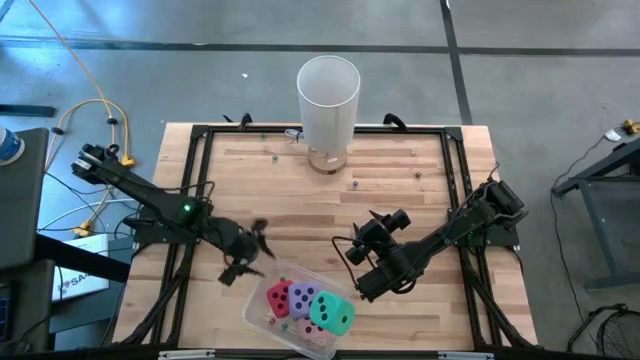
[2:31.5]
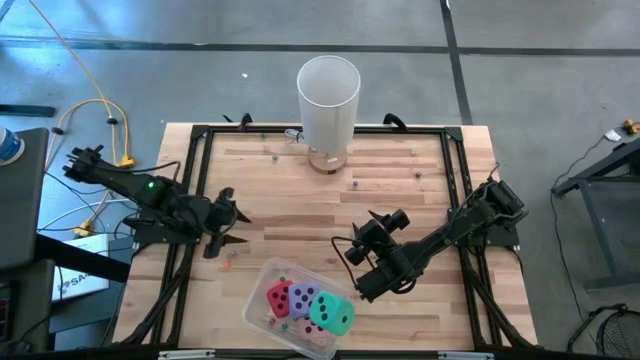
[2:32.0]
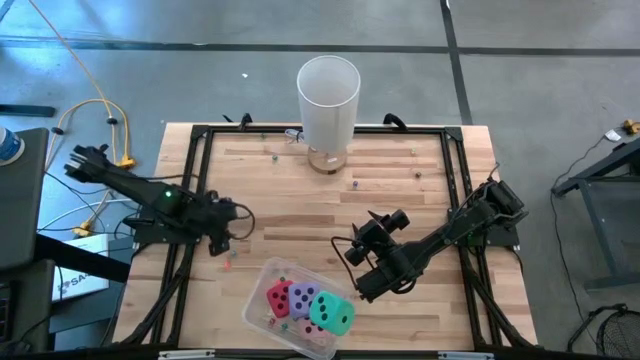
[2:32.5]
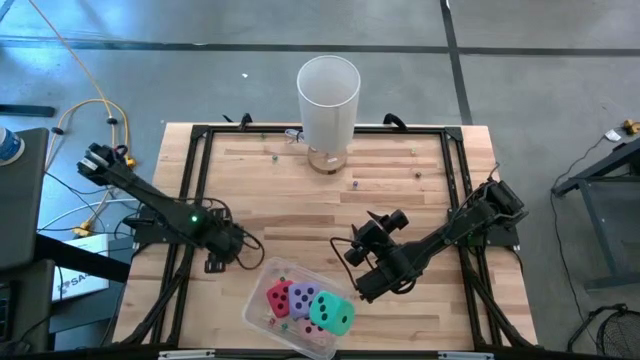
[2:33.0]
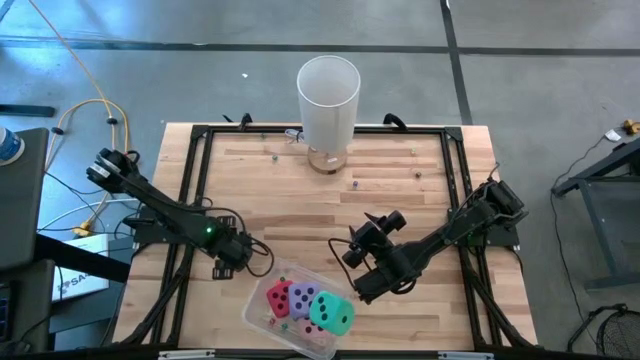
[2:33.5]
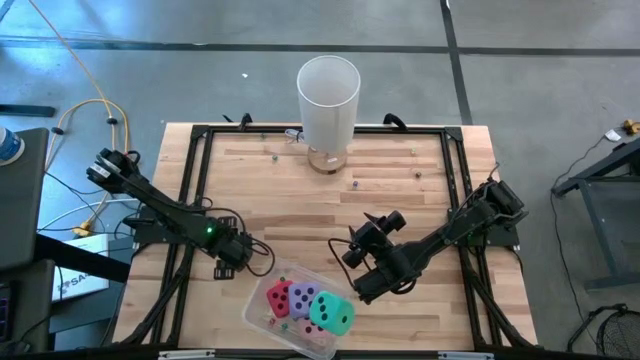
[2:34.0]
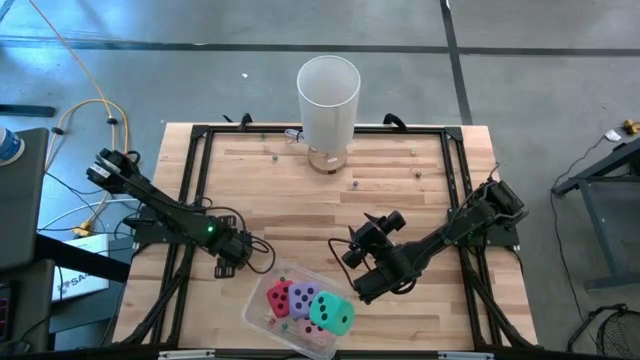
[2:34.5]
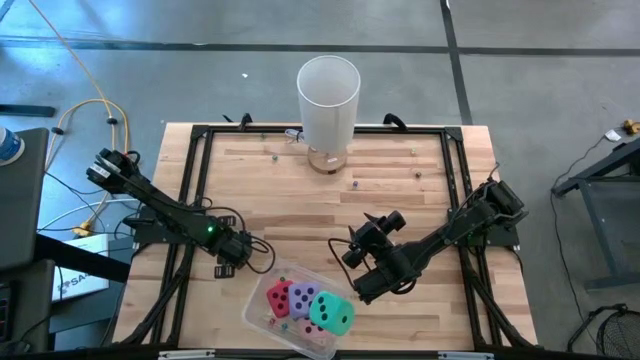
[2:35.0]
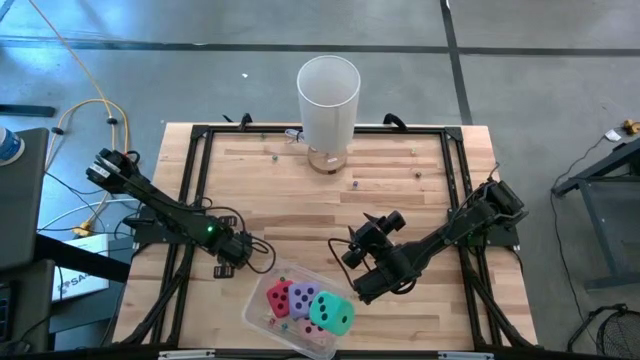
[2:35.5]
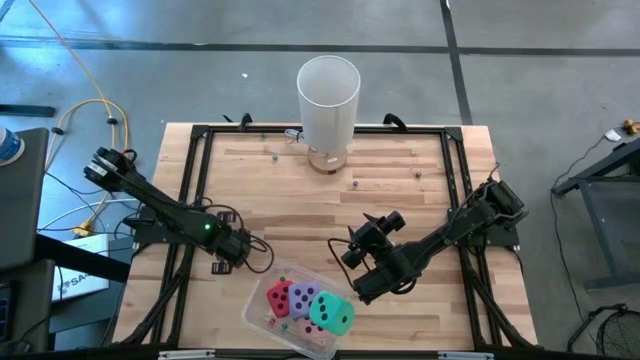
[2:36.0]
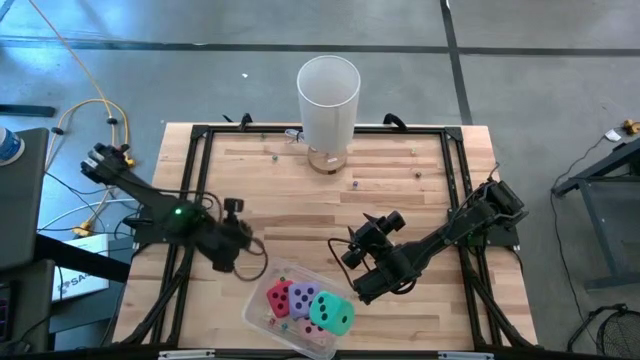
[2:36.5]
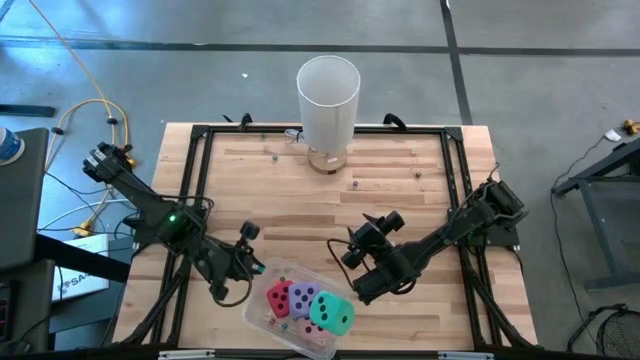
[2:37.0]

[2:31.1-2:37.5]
Task: Pick & Place Dice
Put the small blue dice into the transparent bin

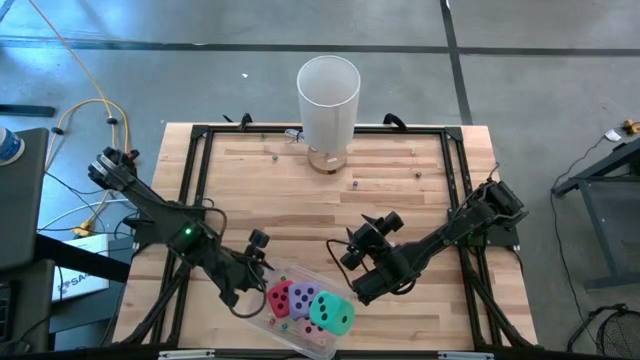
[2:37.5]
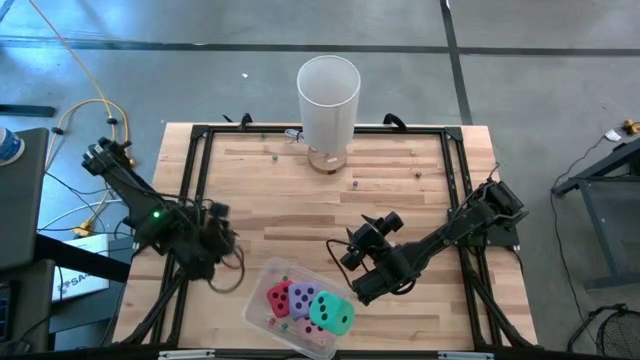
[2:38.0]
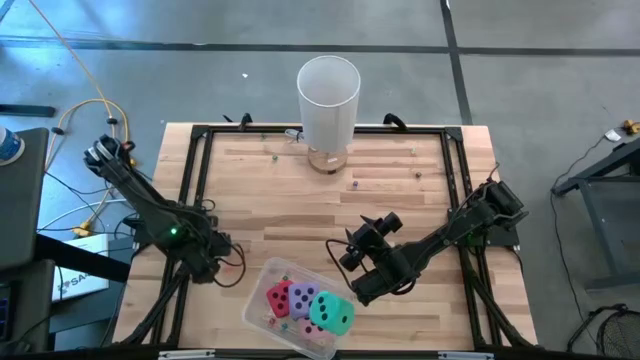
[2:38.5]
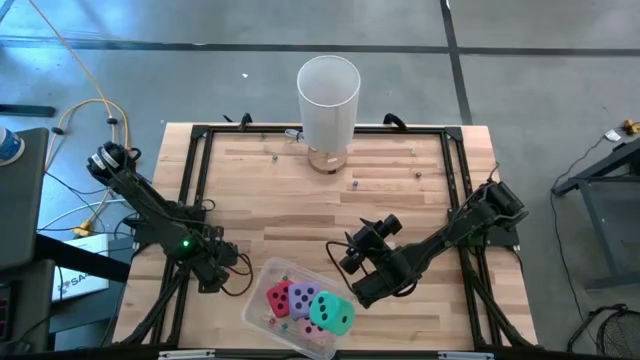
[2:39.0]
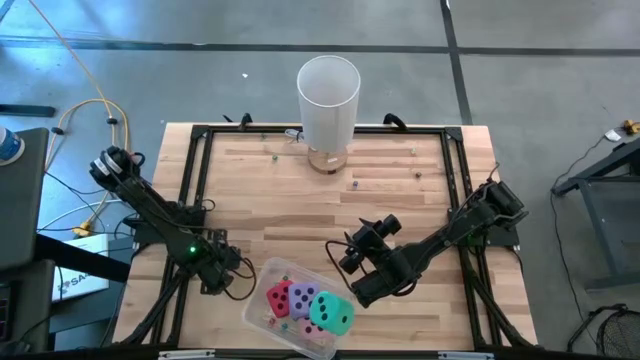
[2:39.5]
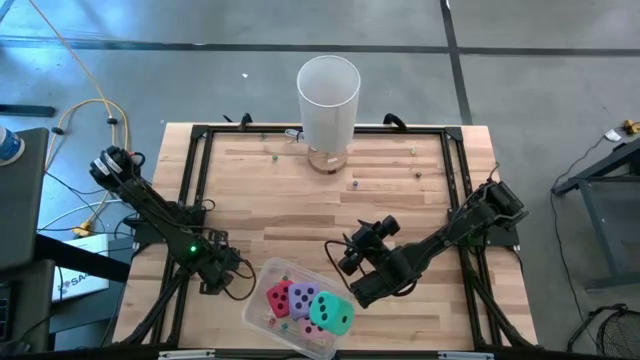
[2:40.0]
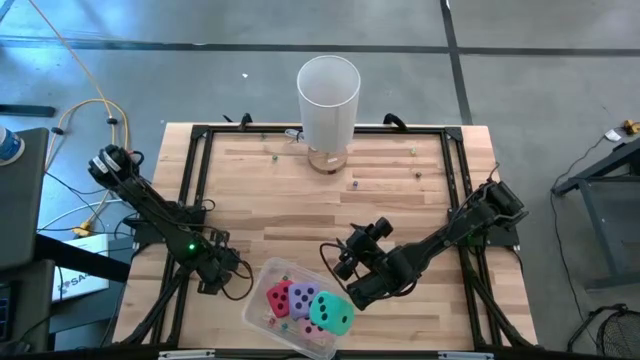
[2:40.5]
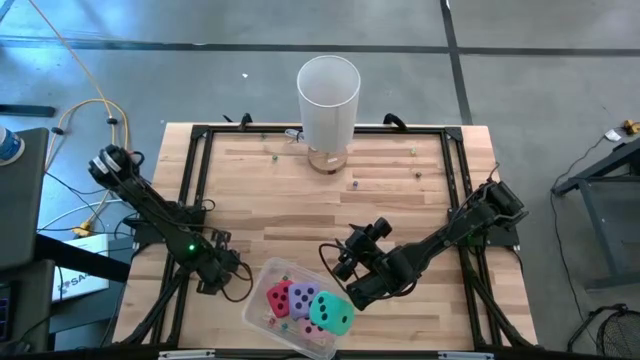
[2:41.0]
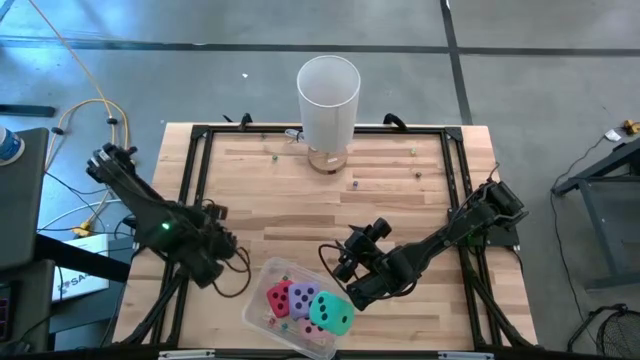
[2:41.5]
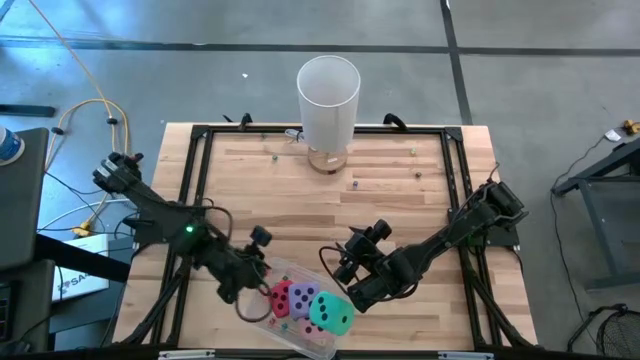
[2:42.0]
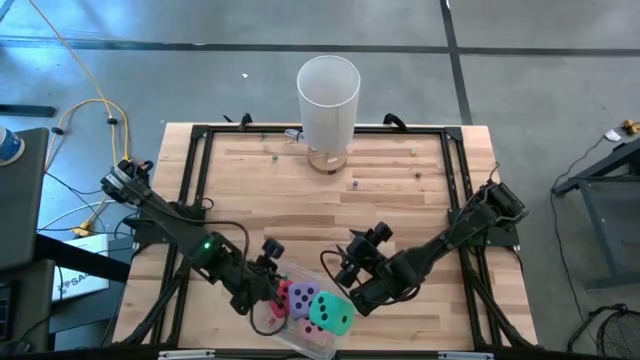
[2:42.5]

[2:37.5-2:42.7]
Put the small orange dice into the transparent bin

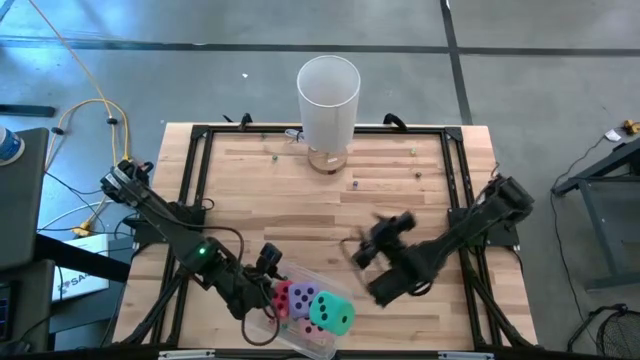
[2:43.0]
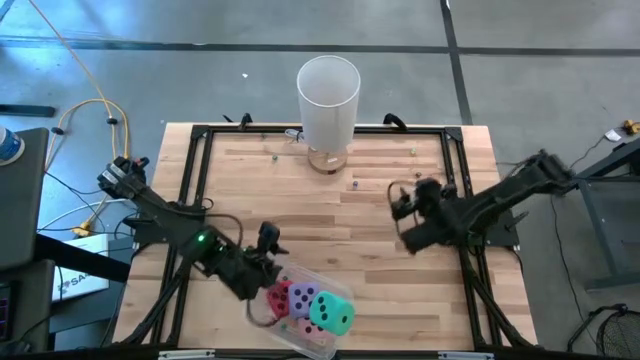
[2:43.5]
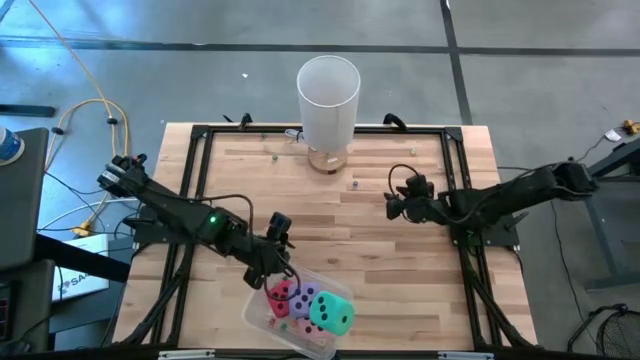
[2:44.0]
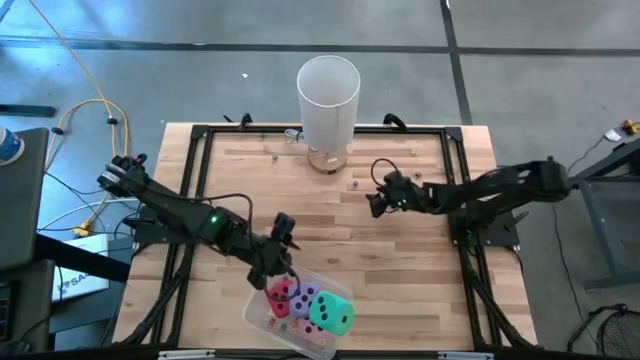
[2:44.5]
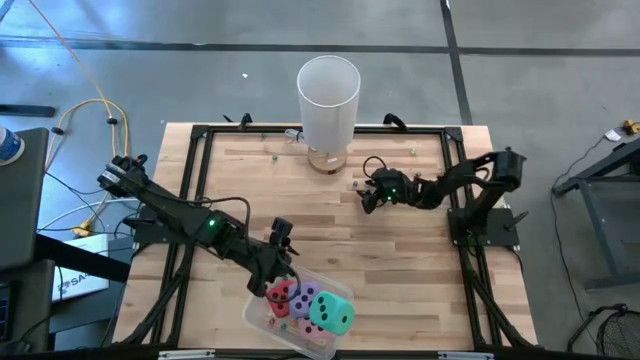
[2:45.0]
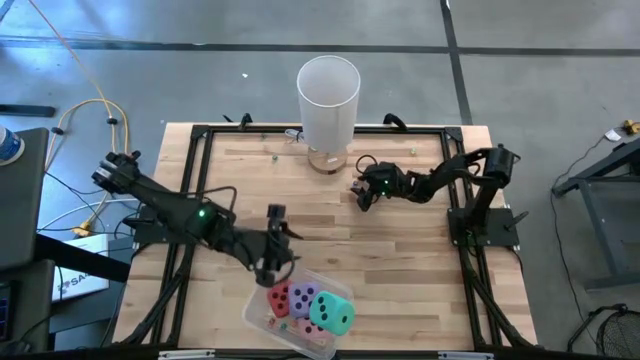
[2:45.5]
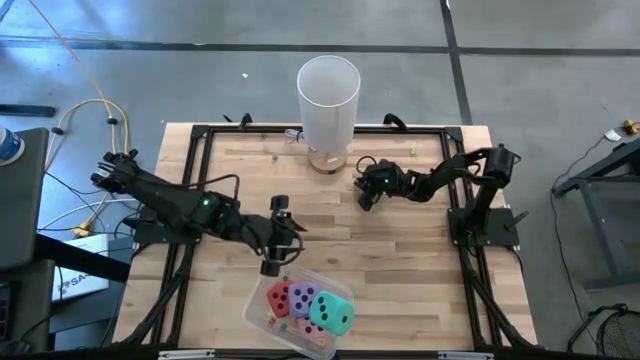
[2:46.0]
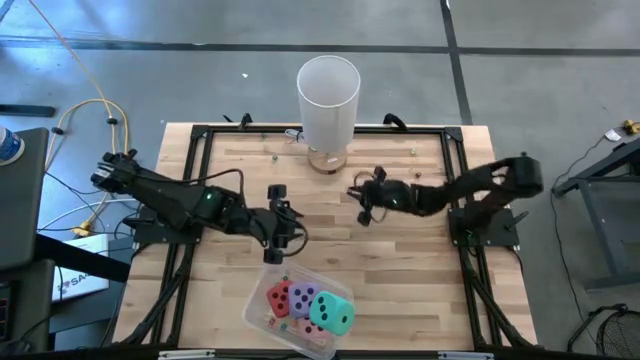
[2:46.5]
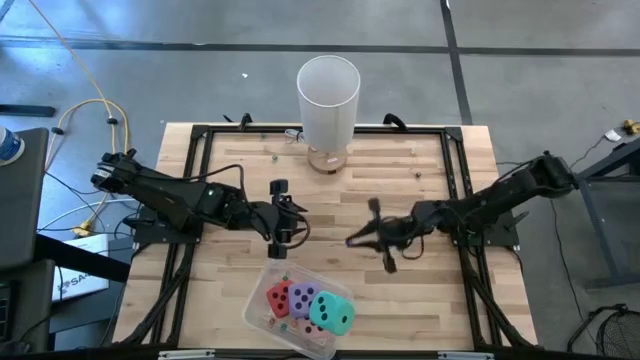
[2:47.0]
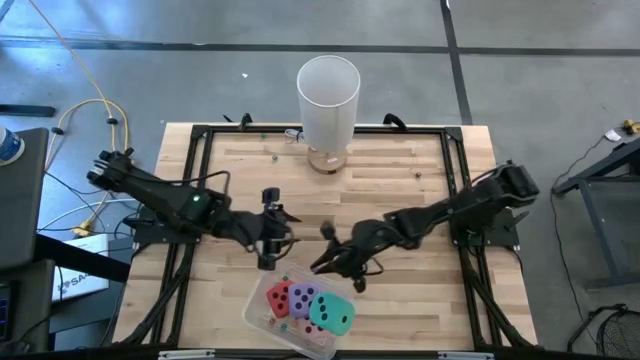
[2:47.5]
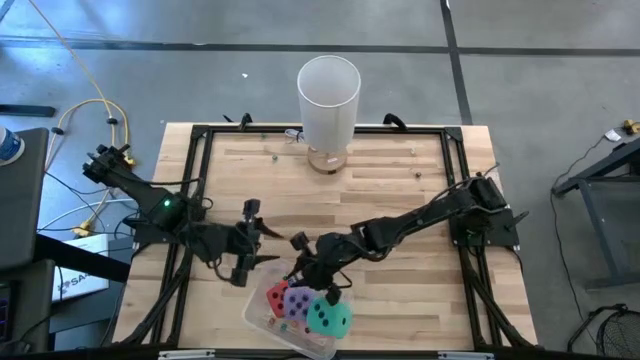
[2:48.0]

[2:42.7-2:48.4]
Put the small blue dice into the transparent bin

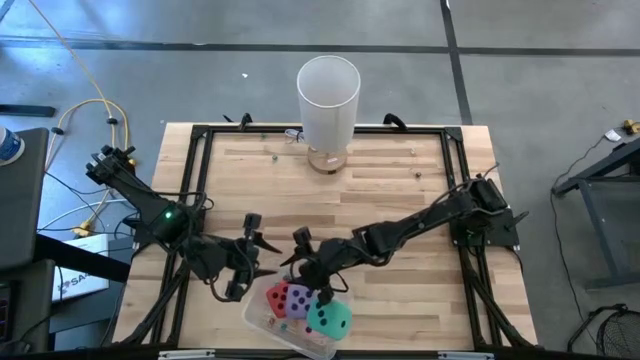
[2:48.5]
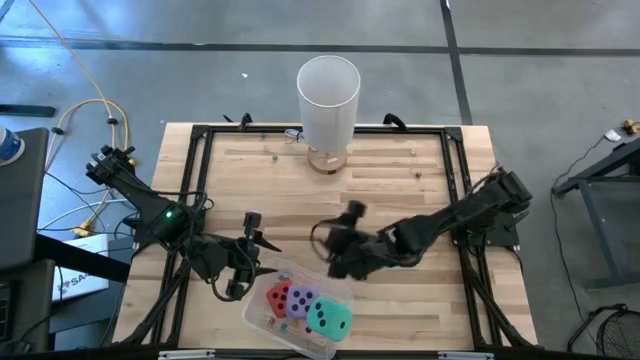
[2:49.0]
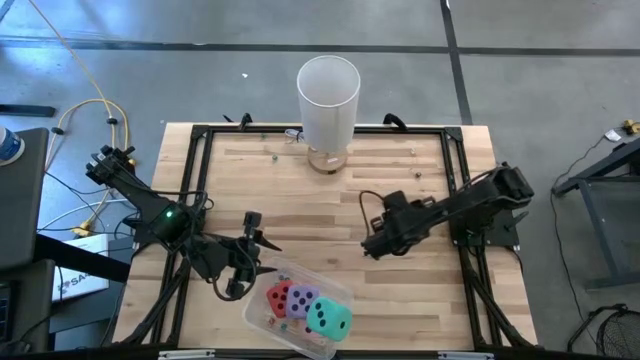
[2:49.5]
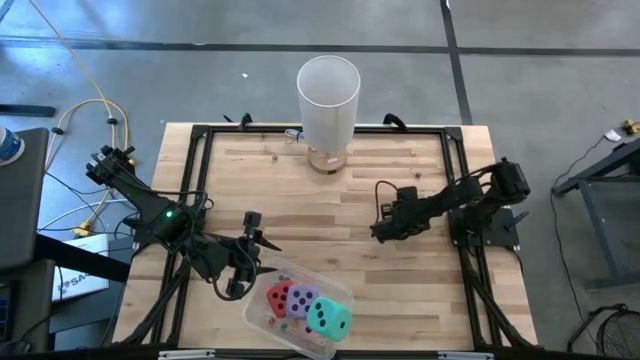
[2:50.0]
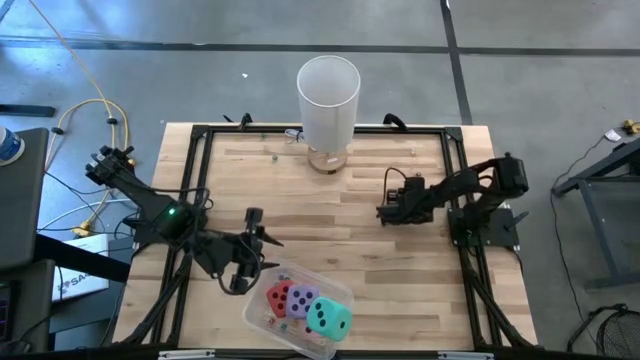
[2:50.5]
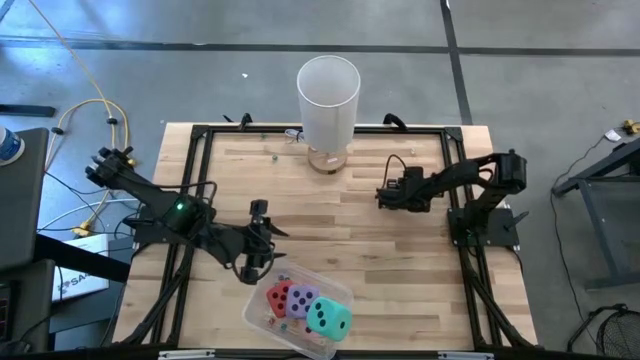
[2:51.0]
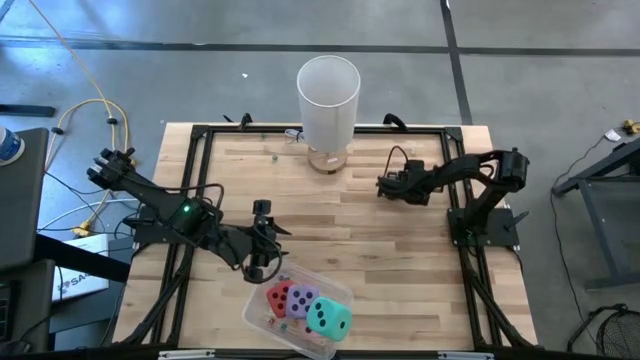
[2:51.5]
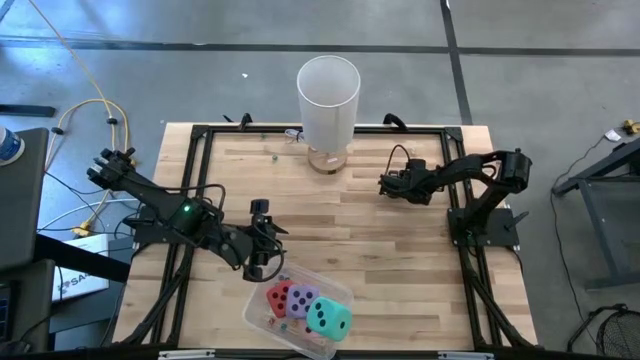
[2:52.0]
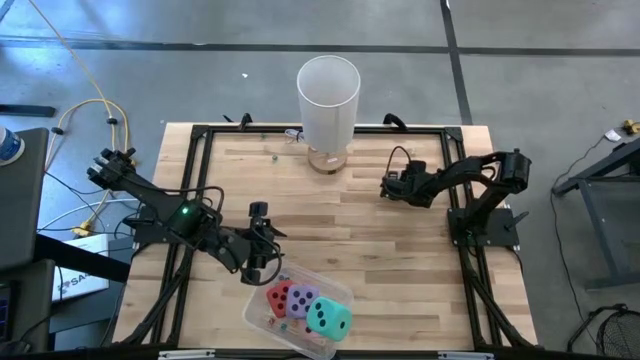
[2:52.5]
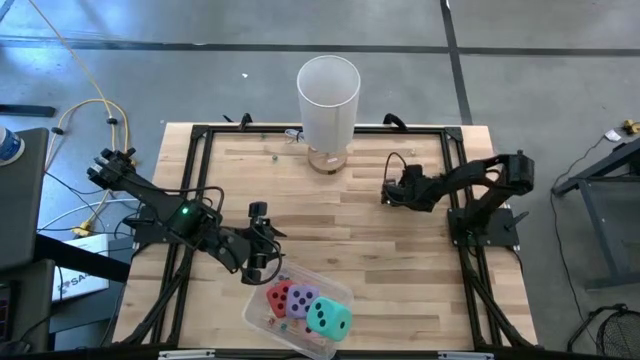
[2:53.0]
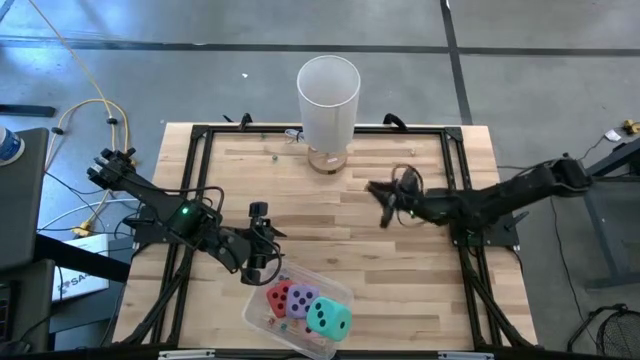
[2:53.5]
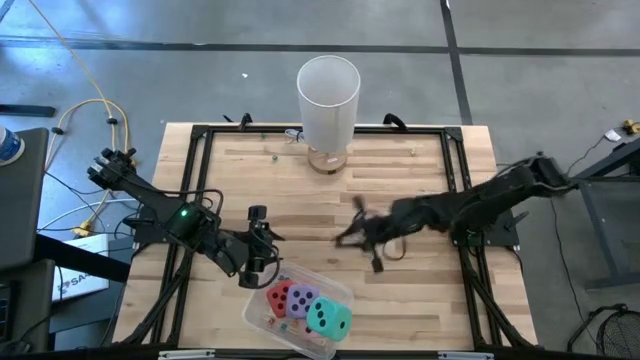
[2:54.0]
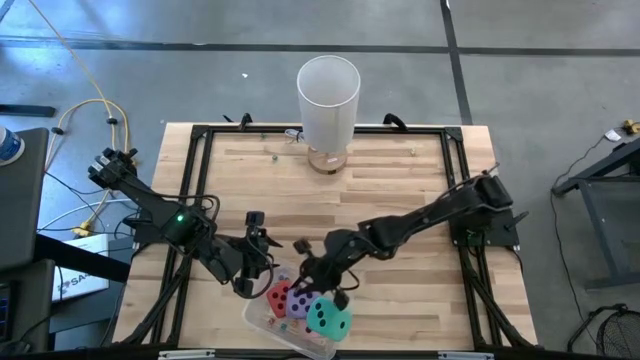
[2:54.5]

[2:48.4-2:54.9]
Put the small black dice into the transparent bin
